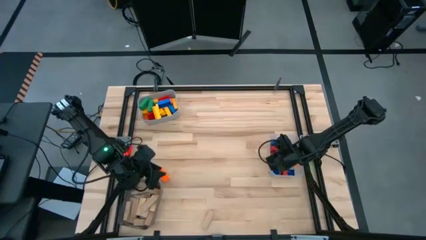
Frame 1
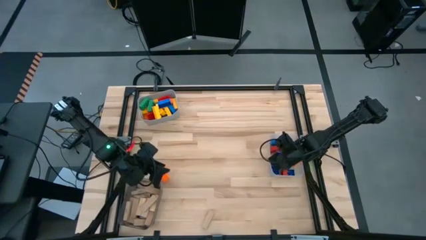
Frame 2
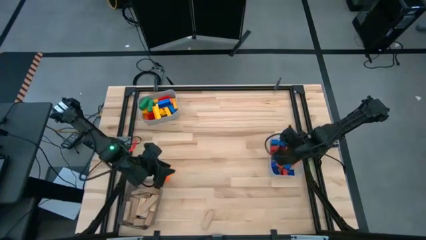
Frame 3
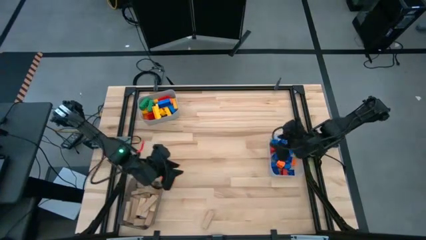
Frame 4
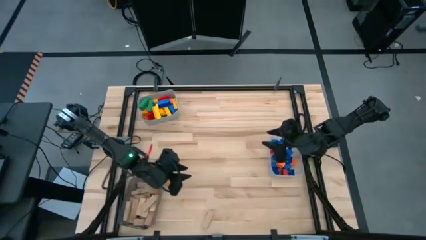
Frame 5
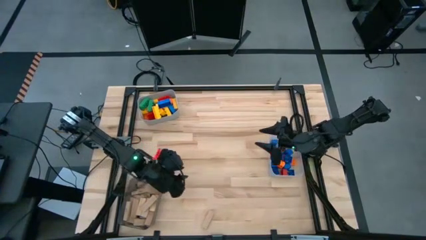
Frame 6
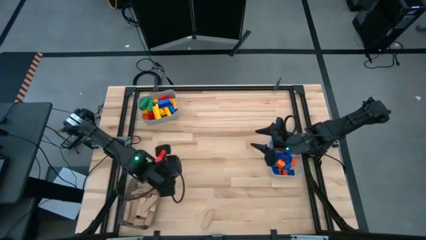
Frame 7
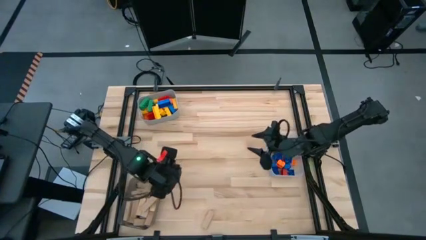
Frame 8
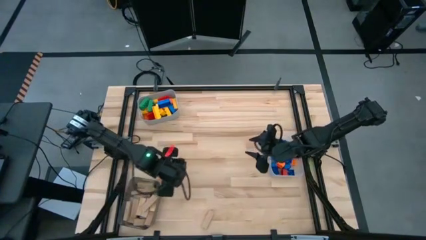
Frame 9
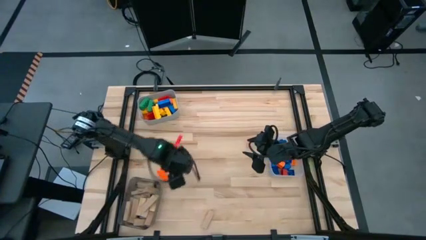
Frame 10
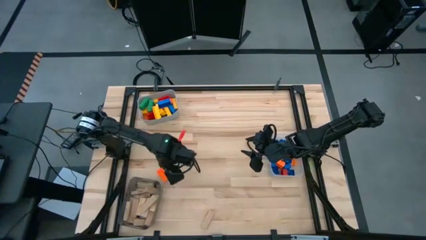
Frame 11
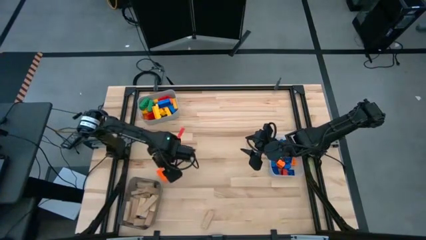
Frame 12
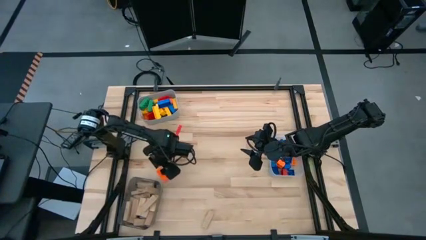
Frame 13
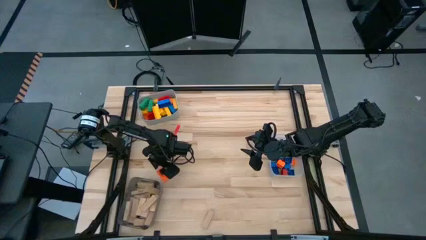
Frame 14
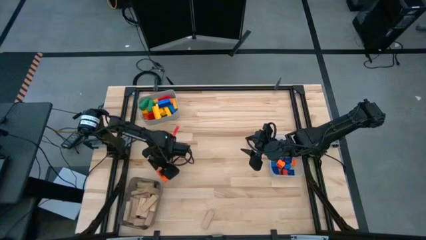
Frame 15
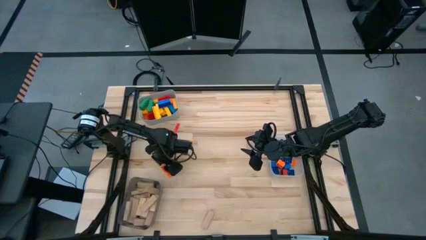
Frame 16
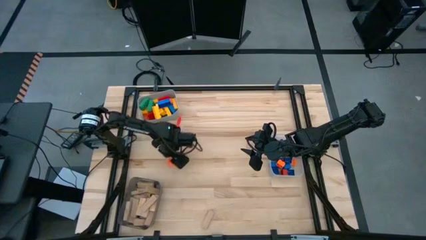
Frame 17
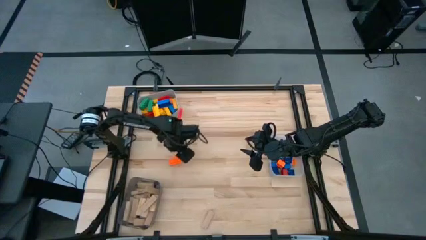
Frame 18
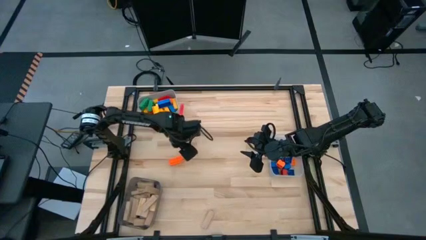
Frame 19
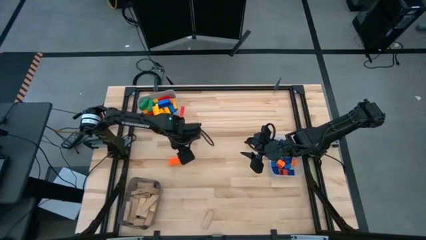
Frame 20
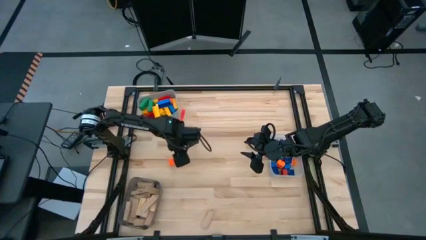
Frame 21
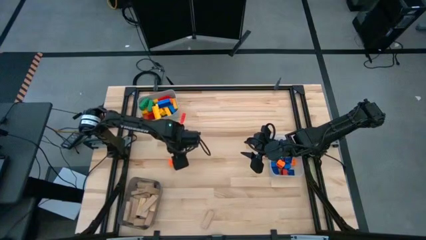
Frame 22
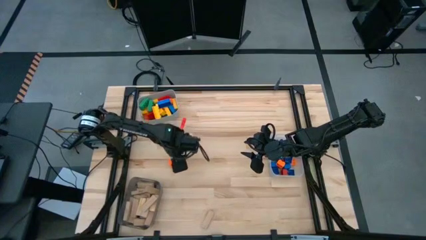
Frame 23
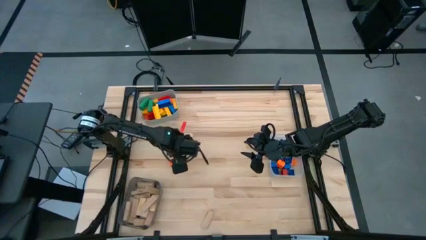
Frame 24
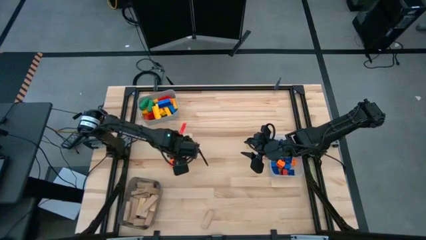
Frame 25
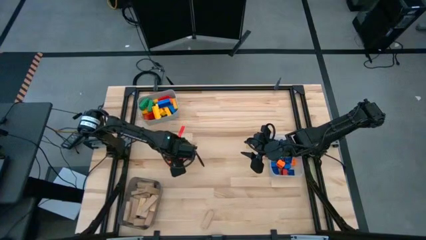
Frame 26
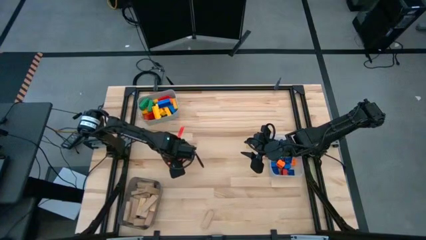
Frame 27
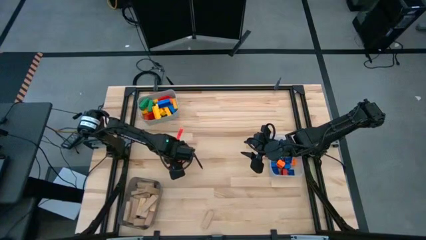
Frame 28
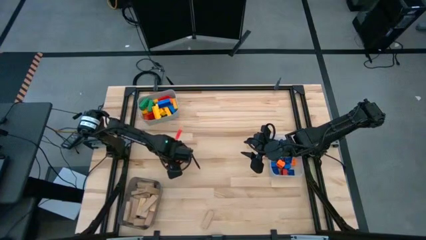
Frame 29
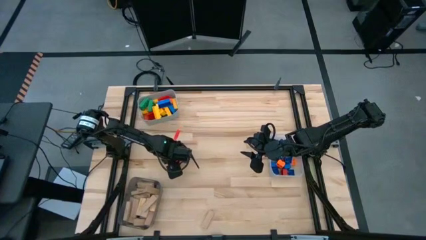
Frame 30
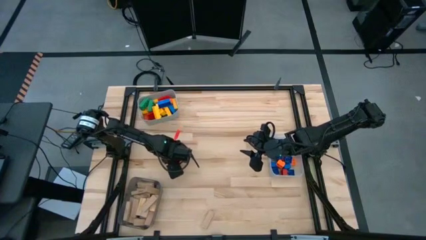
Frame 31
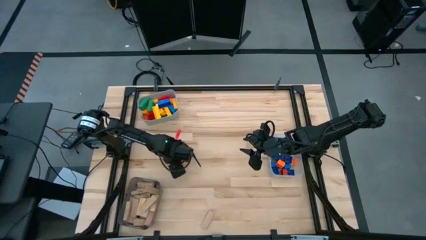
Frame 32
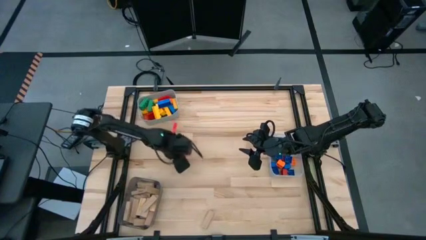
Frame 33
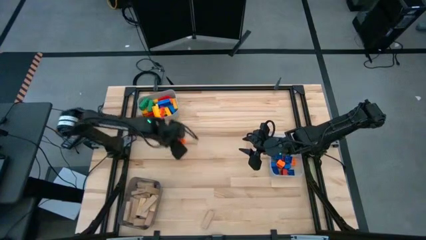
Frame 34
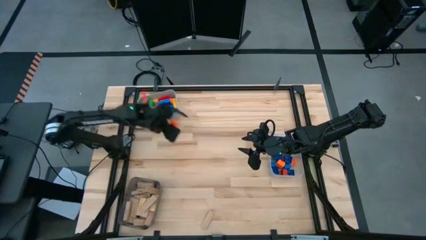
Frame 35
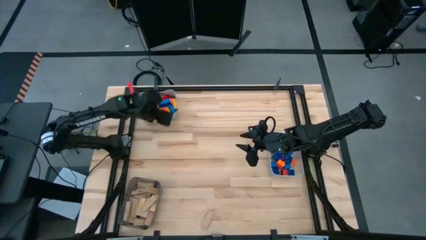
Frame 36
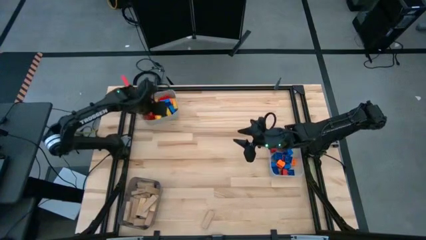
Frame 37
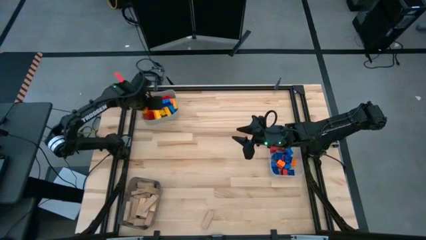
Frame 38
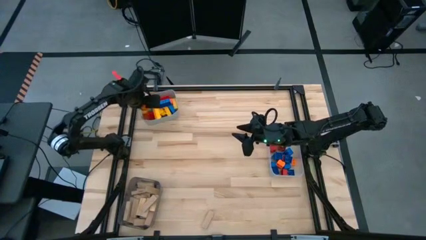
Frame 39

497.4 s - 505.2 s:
Task: Sort blocks by size
Put the large orange game piece into the gray bin

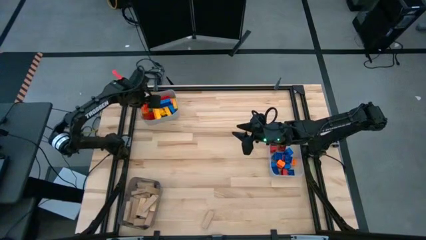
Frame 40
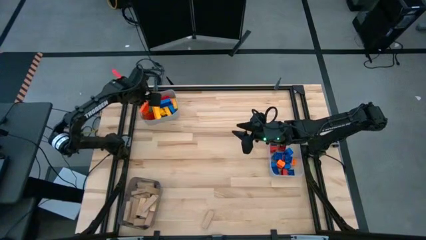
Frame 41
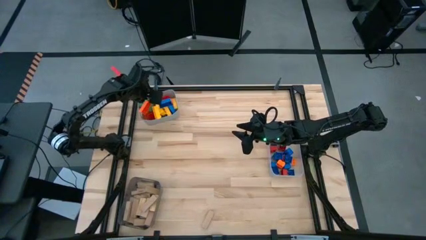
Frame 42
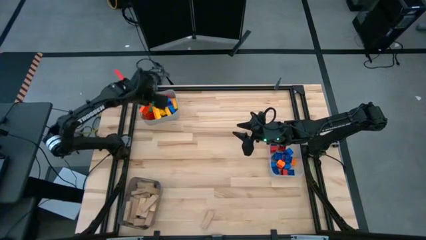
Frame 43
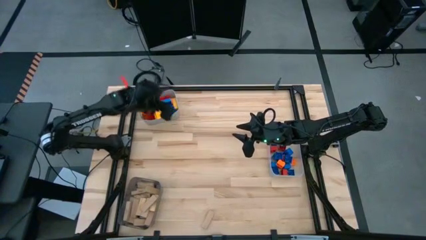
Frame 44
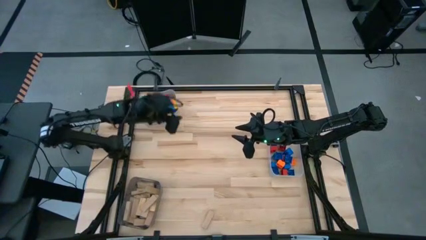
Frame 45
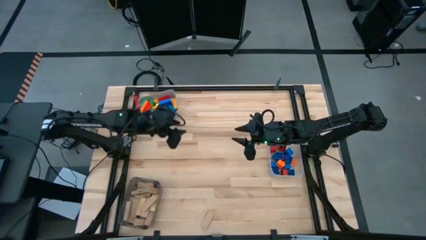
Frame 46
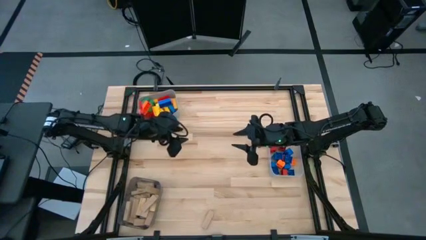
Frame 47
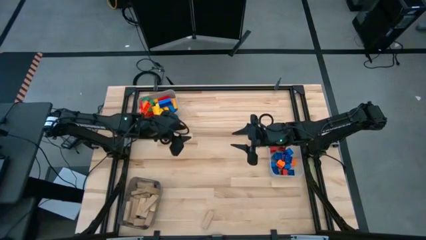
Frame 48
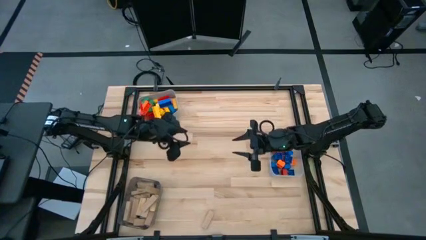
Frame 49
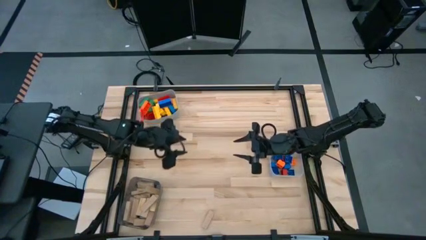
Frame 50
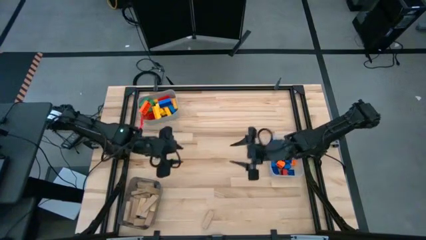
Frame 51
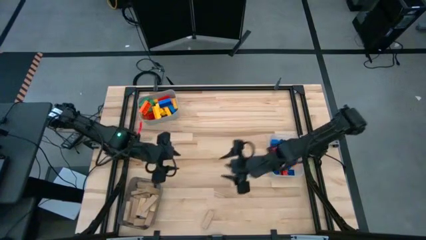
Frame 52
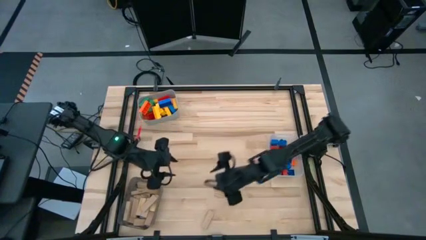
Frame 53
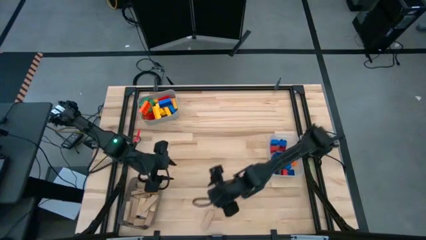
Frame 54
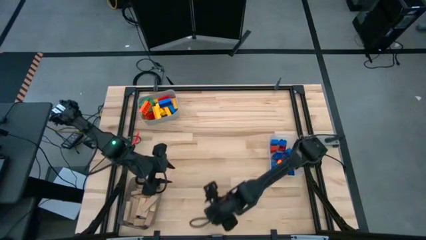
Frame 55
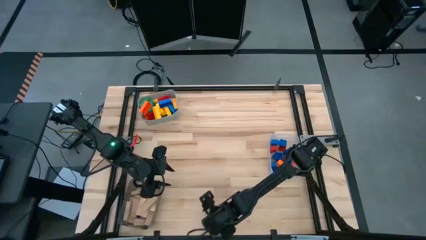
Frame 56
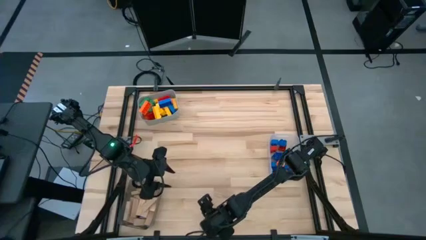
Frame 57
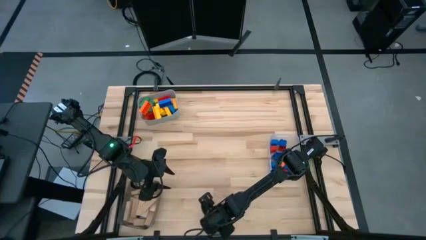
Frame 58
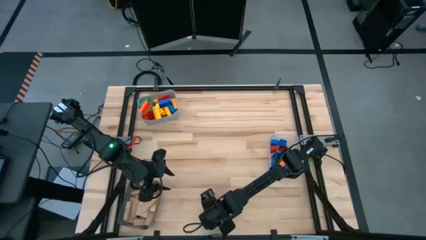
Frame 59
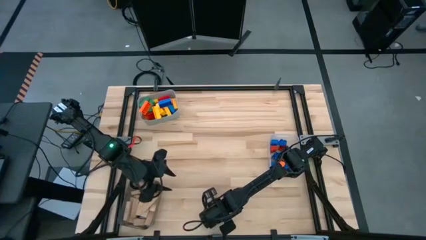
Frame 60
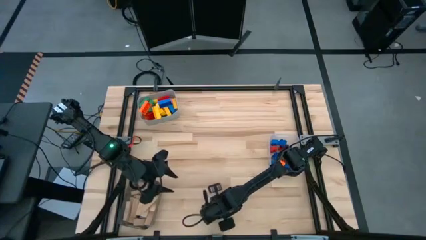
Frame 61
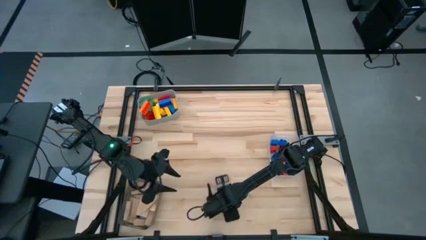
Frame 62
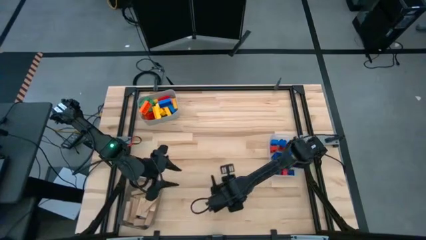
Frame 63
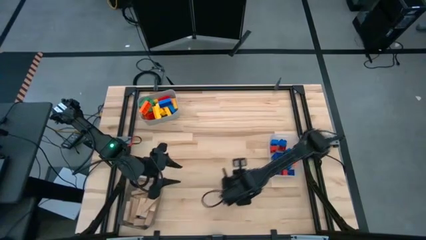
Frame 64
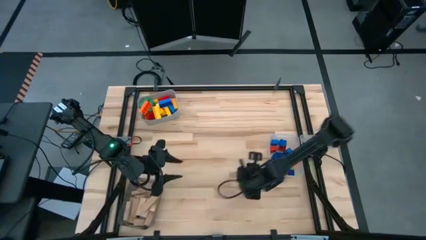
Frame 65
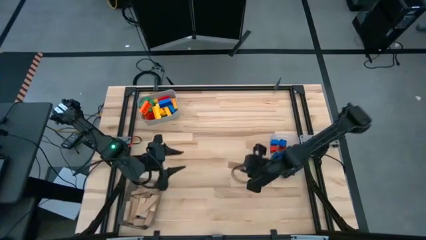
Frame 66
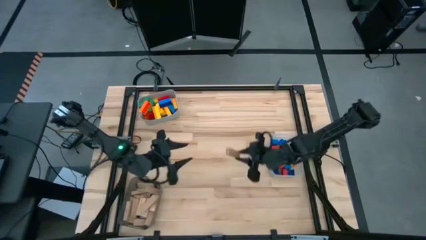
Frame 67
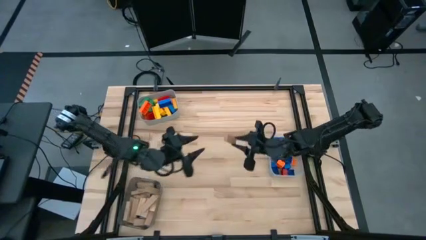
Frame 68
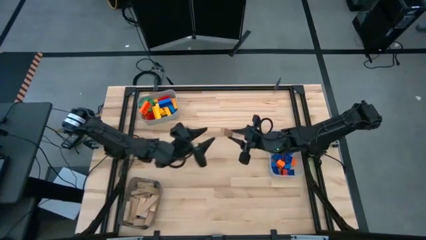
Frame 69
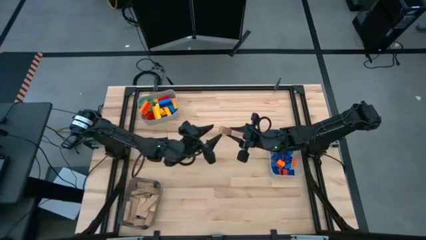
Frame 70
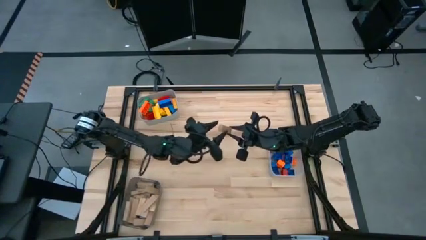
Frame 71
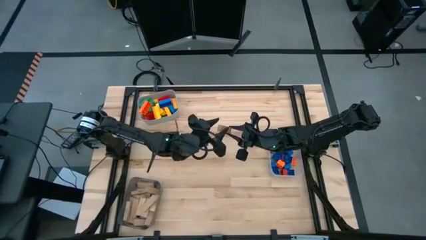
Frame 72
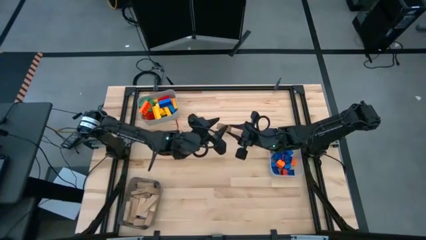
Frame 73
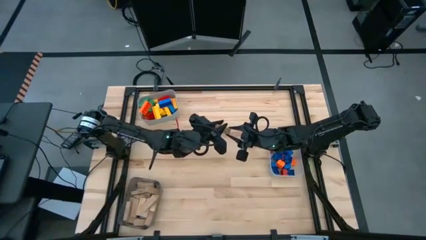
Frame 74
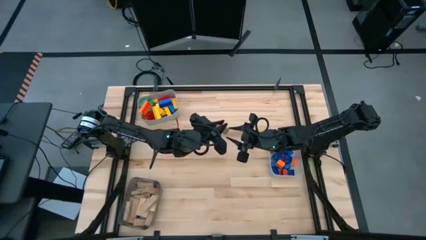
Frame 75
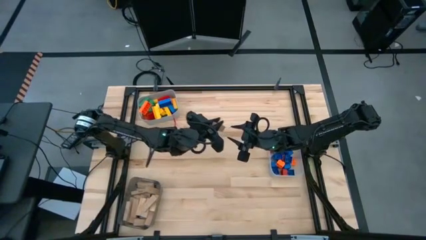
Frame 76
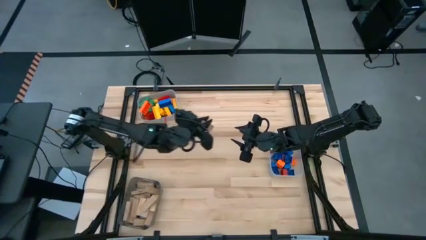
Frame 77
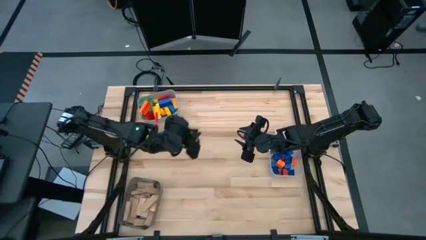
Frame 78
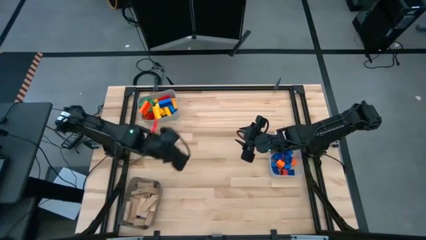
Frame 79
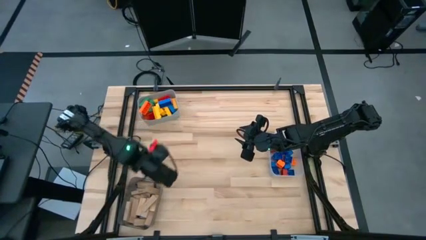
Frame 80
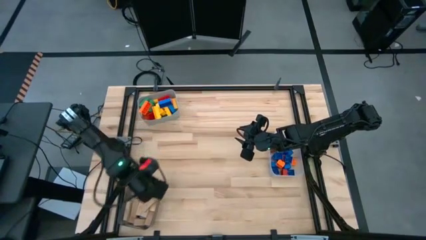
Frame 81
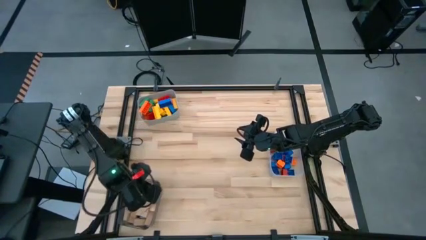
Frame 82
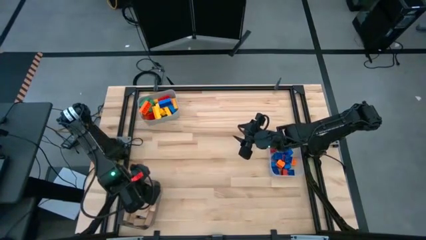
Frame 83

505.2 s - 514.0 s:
Put the brown block into the black bin
